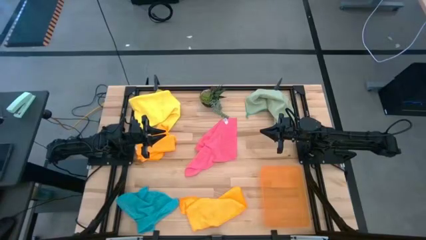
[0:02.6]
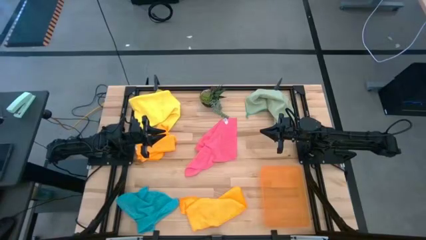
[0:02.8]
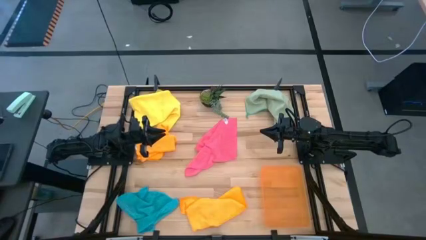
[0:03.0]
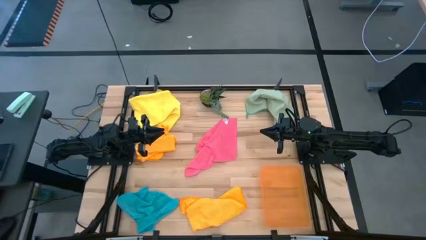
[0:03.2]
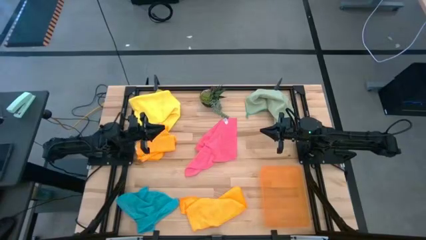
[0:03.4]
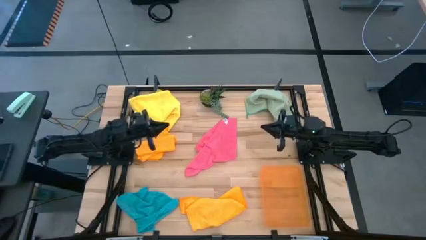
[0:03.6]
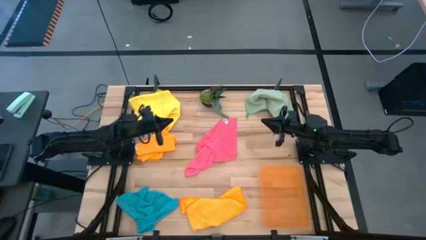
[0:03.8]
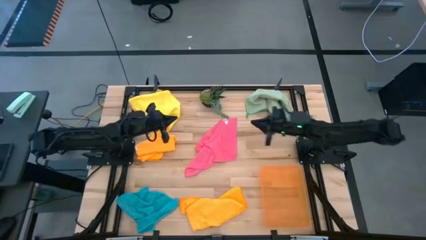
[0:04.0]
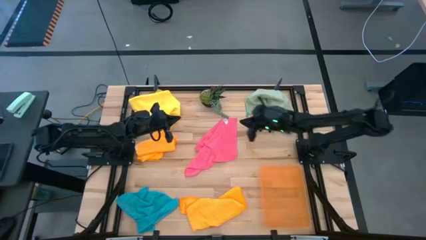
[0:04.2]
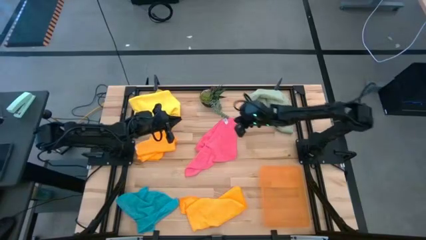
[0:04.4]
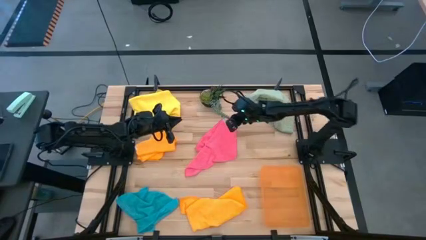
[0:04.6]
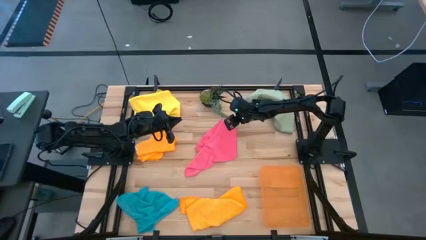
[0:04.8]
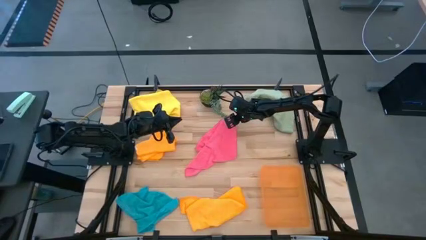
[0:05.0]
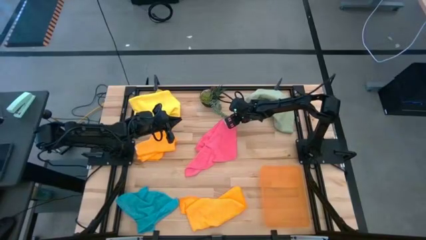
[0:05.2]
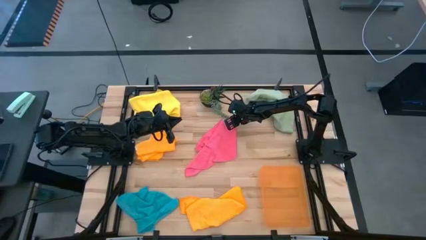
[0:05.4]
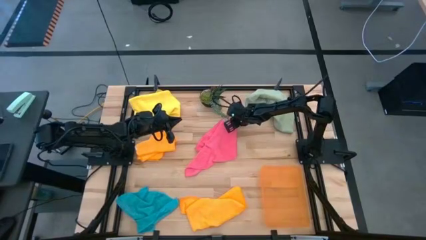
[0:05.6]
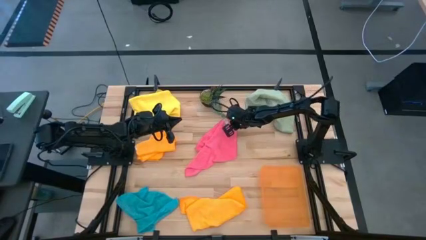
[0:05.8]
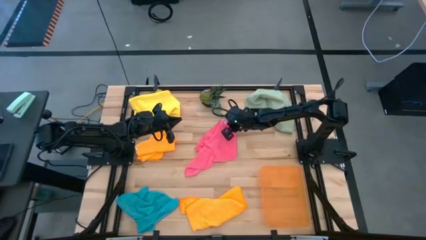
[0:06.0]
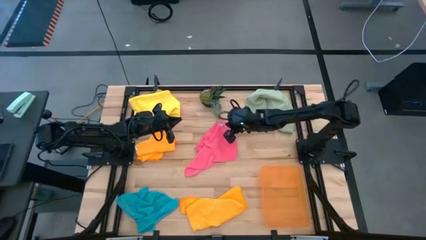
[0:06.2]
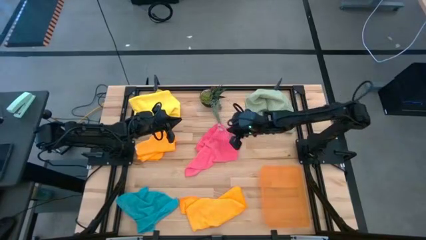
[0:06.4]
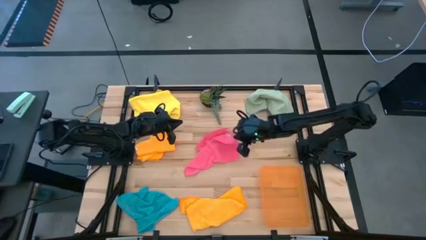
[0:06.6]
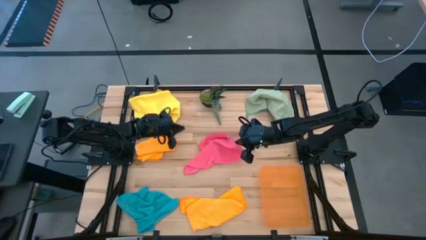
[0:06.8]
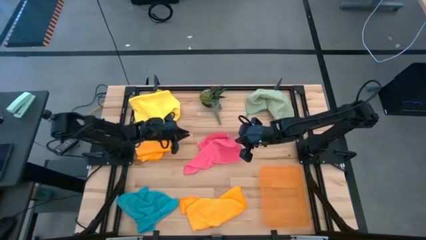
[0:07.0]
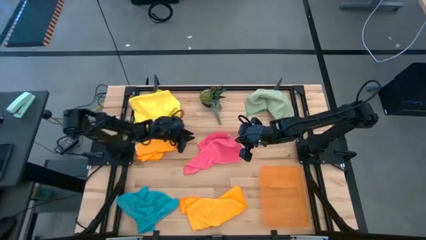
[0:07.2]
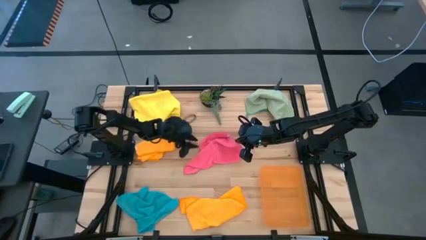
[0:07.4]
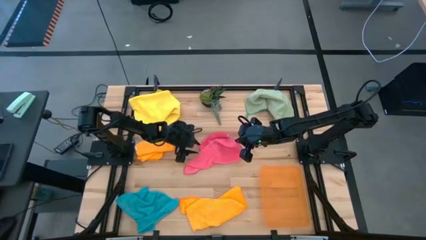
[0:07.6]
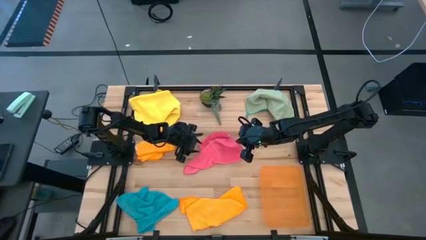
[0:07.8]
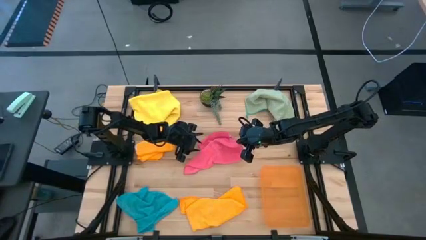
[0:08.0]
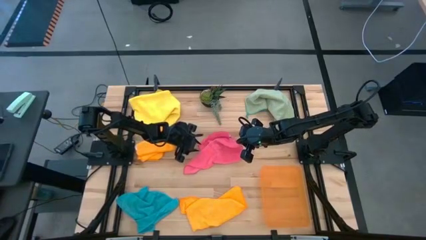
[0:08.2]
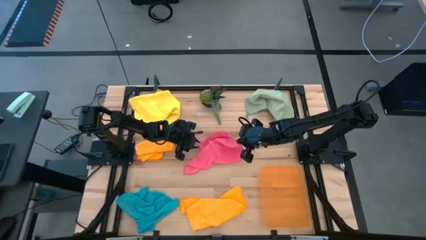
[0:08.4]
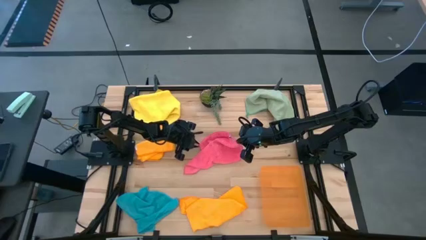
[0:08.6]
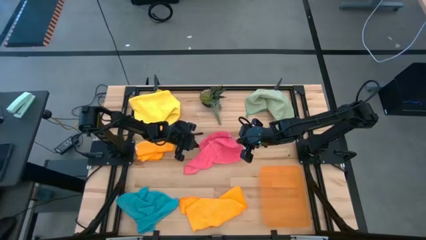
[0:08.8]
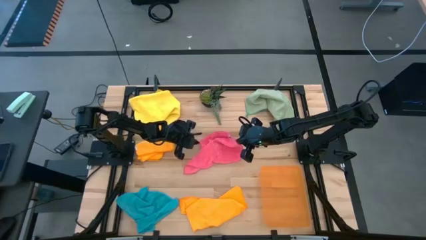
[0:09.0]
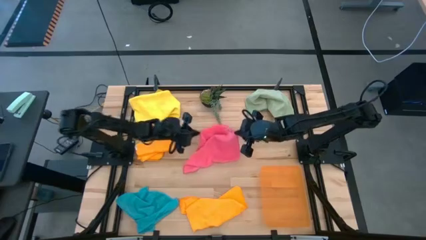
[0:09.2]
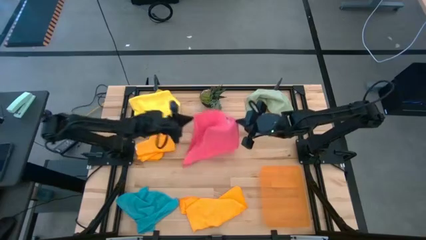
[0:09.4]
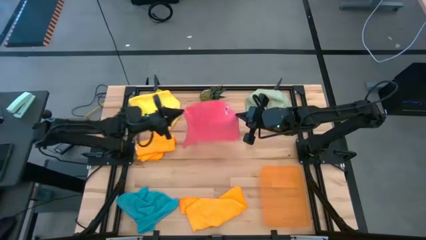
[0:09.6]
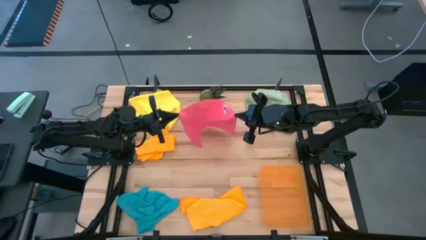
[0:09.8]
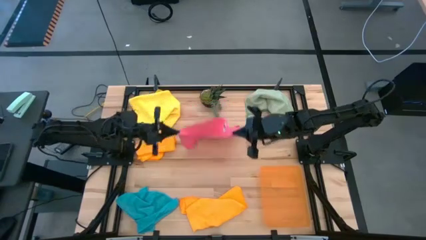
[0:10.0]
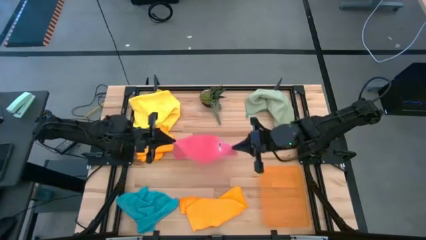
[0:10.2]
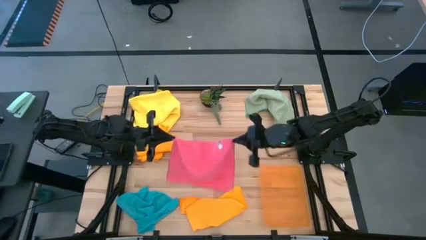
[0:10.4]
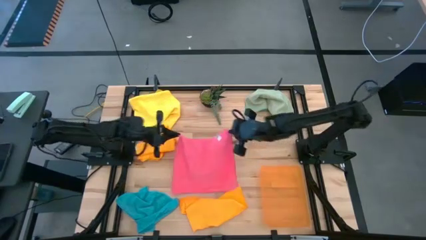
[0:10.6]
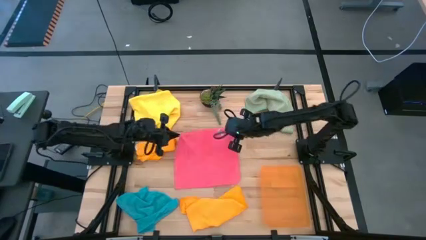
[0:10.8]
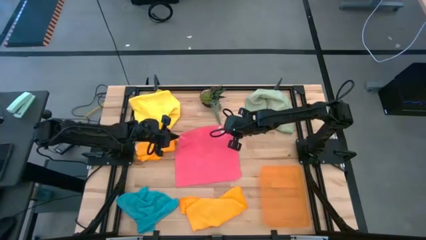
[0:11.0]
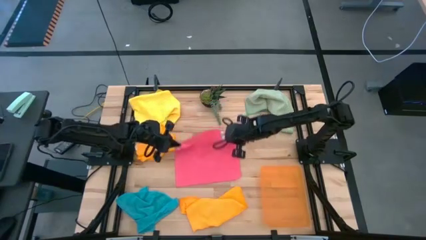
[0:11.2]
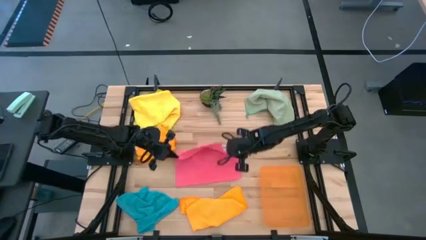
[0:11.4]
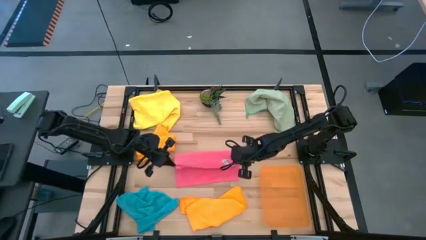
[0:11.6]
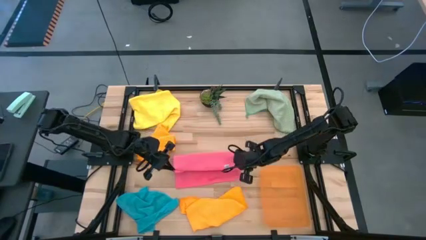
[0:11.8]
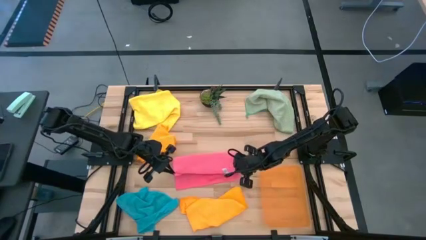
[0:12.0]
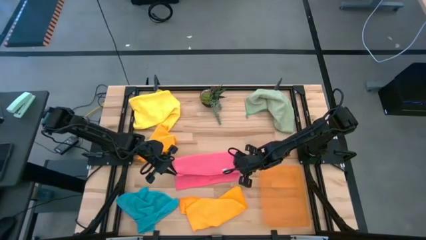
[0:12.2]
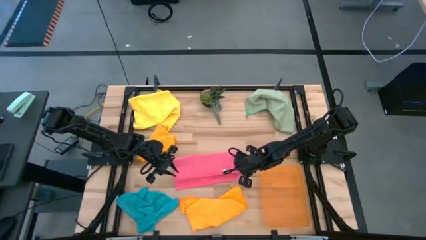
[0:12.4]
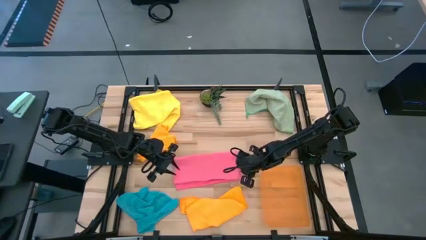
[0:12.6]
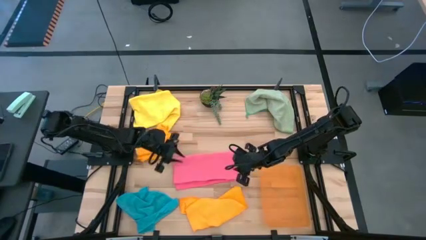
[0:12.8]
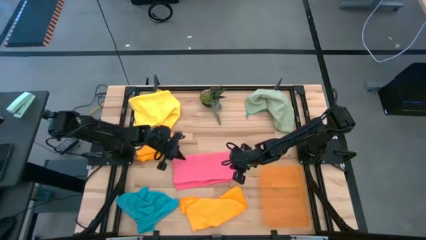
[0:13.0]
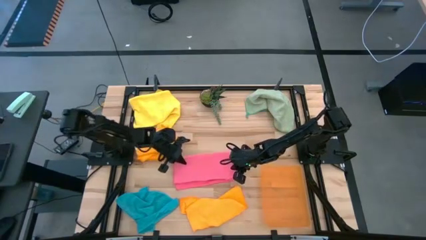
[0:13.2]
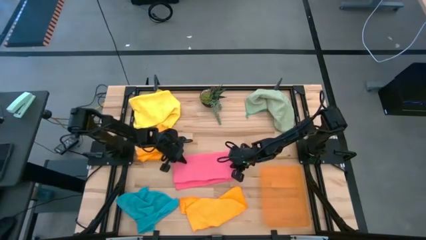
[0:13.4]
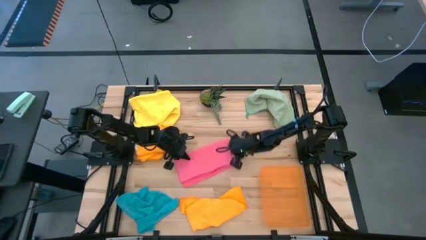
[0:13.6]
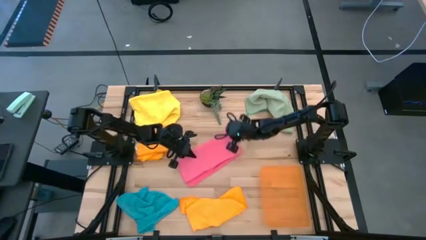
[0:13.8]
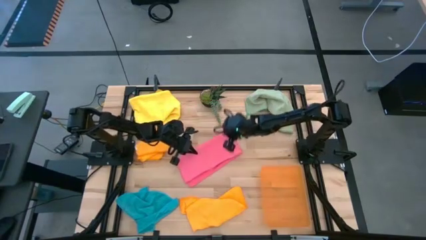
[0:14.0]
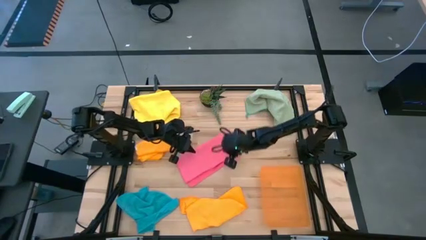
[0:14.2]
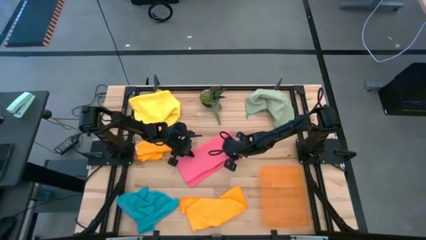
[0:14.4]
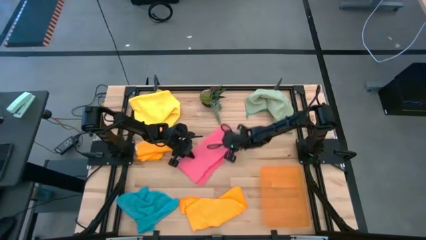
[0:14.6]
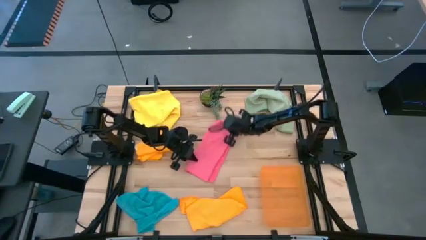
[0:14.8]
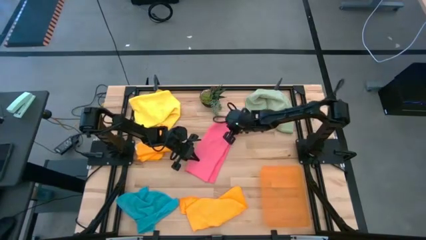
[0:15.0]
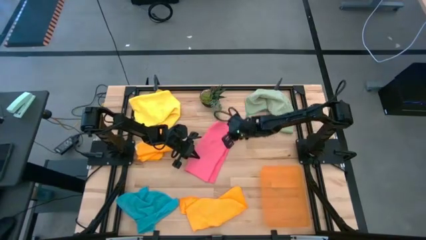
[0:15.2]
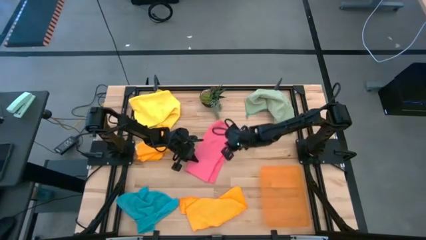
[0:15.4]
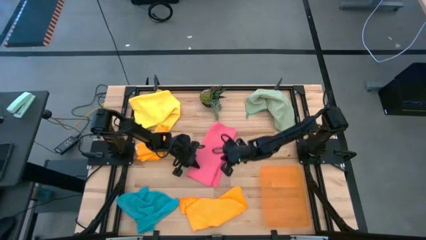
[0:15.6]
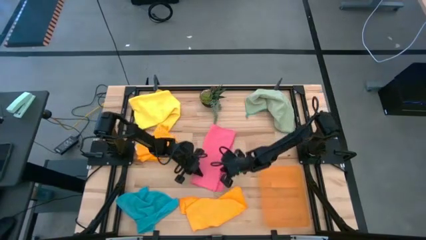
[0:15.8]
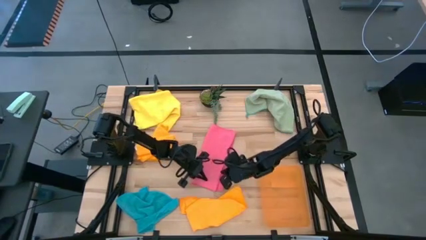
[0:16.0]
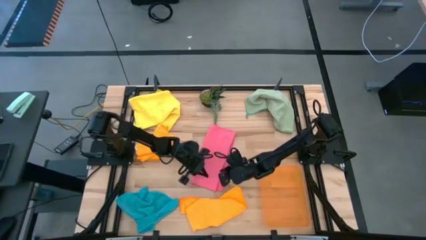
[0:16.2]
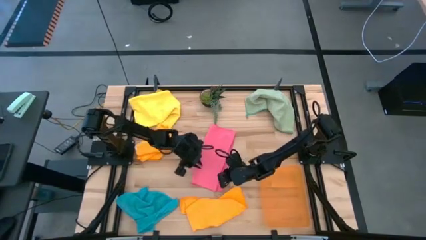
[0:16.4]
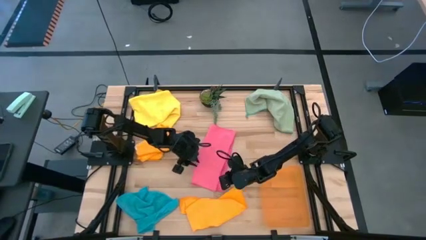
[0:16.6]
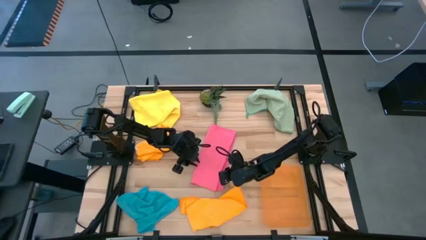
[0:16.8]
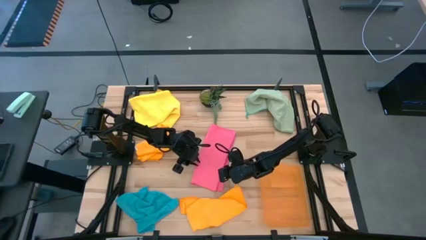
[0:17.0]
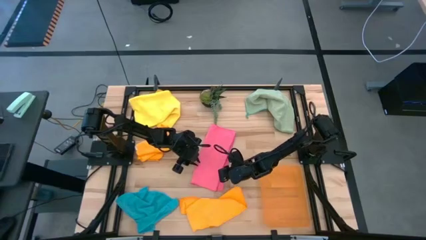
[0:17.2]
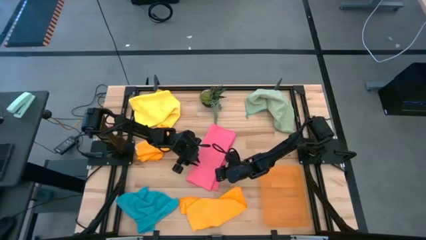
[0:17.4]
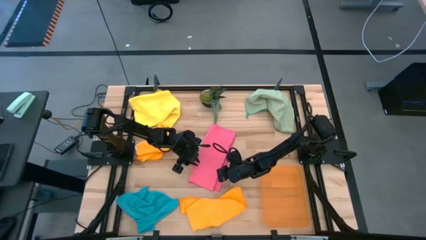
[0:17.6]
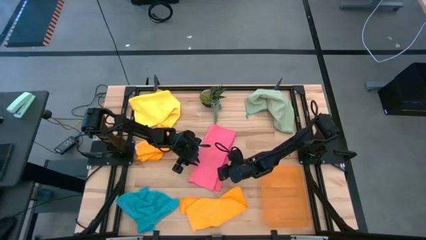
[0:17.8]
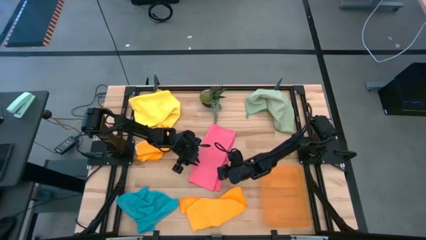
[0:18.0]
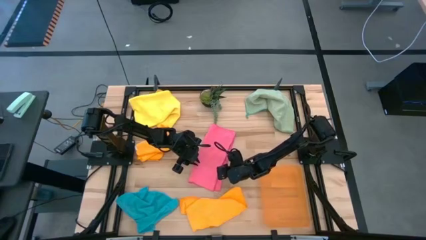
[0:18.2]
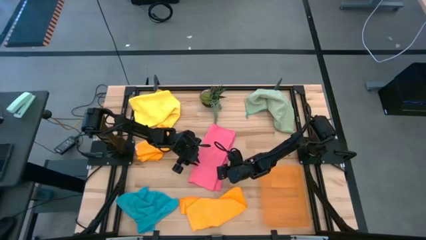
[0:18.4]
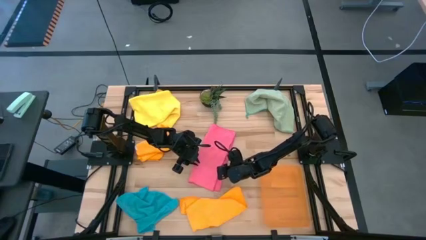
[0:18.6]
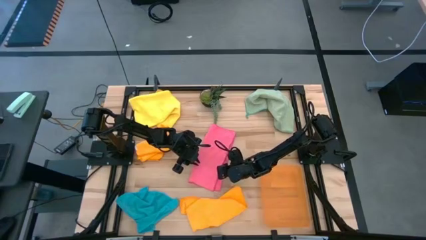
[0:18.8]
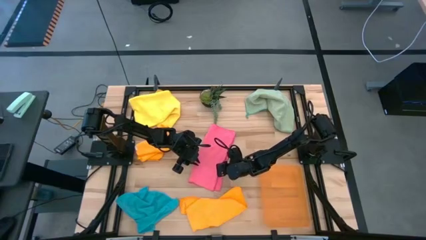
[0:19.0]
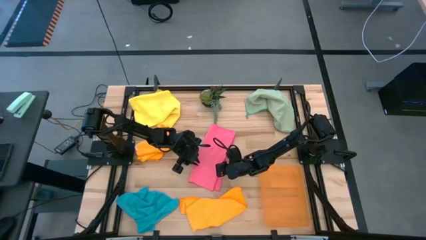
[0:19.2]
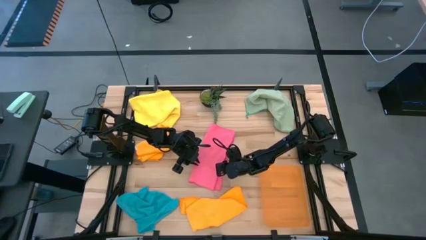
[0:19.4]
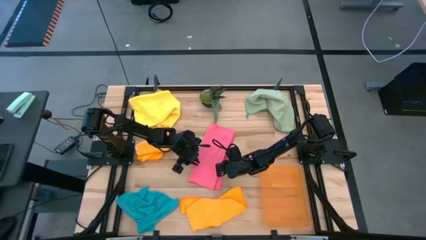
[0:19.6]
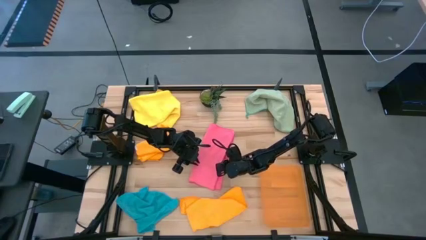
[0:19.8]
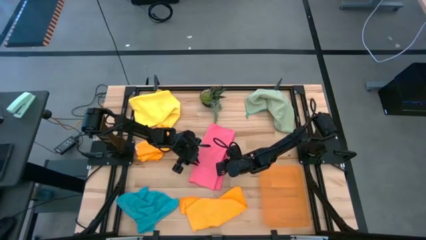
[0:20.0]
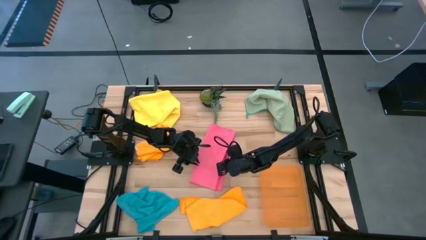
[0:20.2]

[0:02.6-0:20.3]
Task: Fold microfiber towels
Fold the pink microfiber towel
